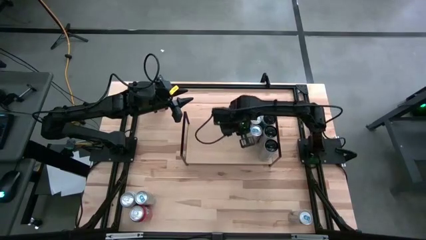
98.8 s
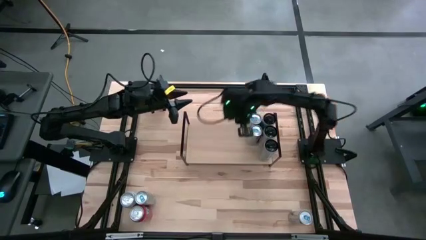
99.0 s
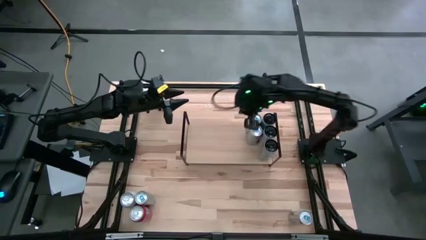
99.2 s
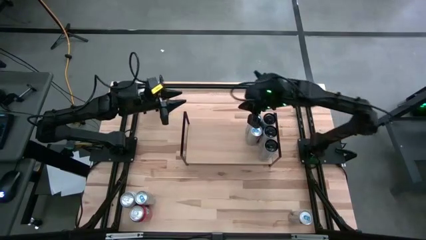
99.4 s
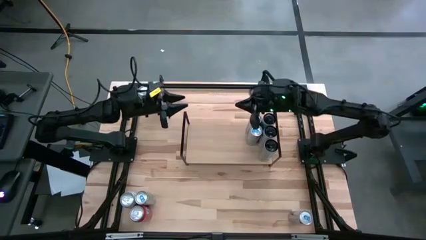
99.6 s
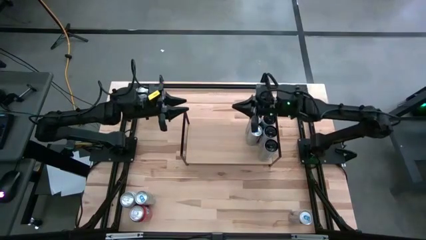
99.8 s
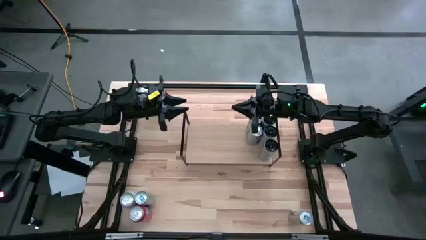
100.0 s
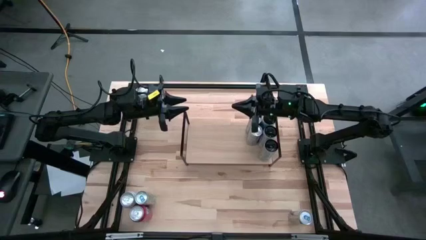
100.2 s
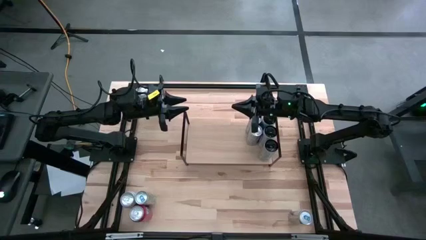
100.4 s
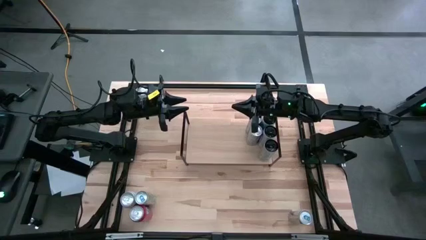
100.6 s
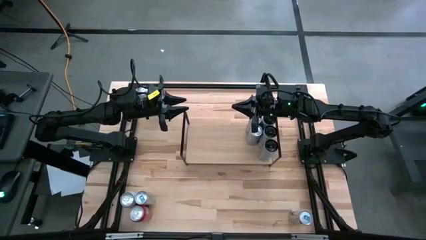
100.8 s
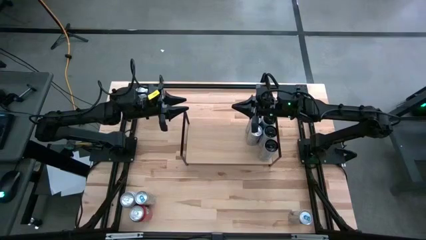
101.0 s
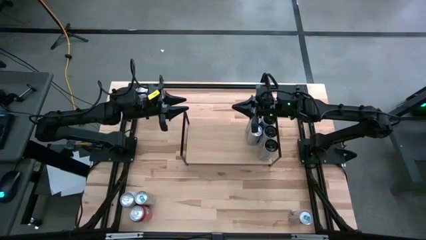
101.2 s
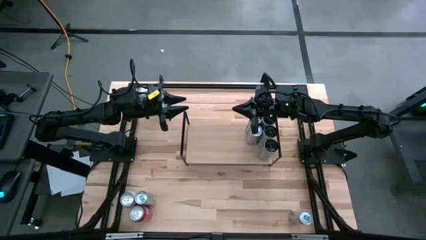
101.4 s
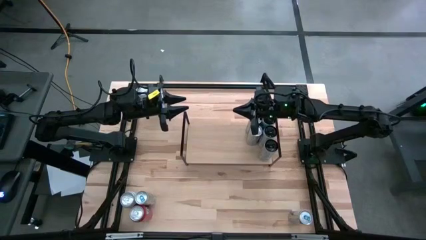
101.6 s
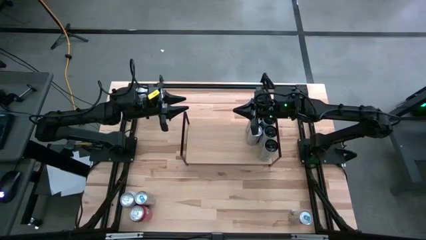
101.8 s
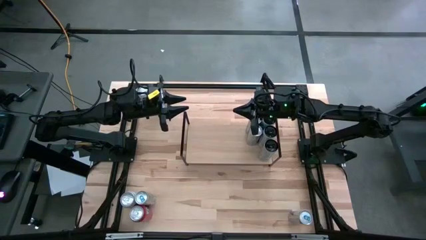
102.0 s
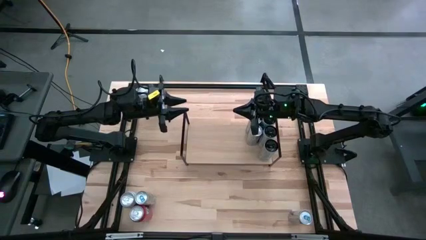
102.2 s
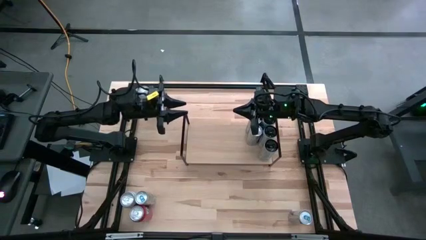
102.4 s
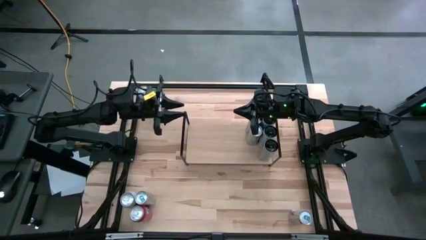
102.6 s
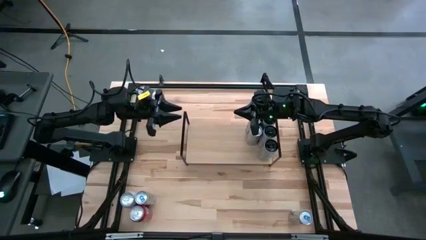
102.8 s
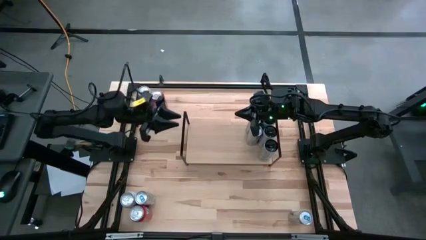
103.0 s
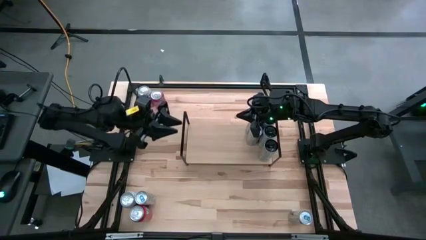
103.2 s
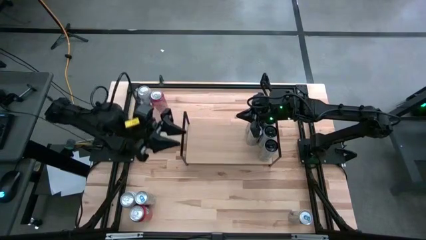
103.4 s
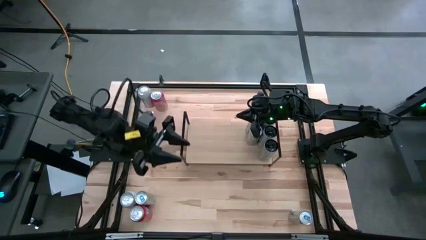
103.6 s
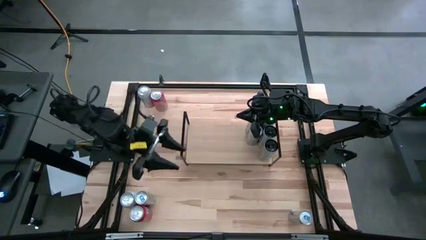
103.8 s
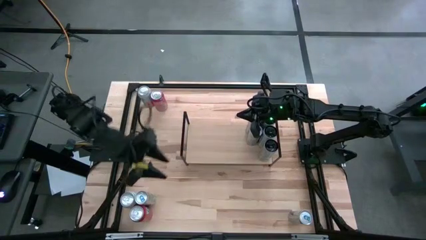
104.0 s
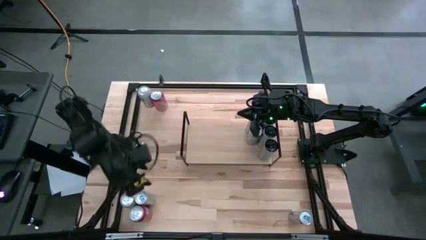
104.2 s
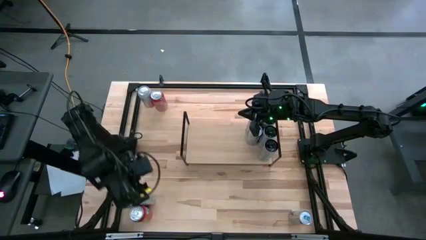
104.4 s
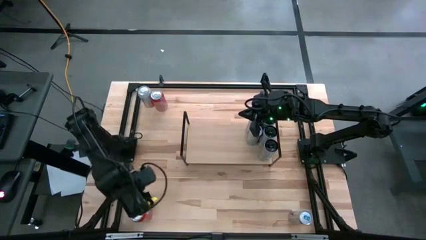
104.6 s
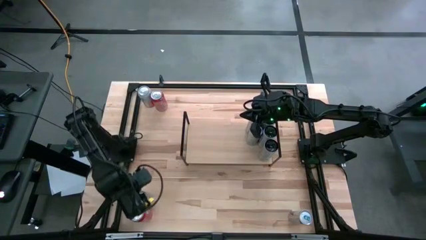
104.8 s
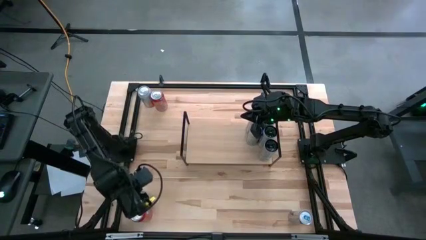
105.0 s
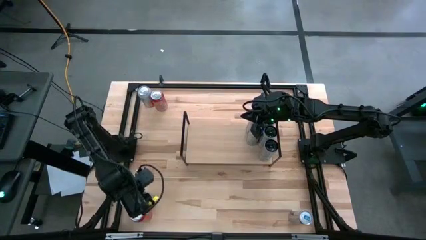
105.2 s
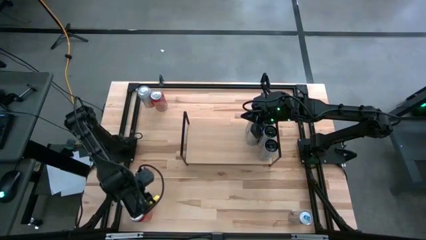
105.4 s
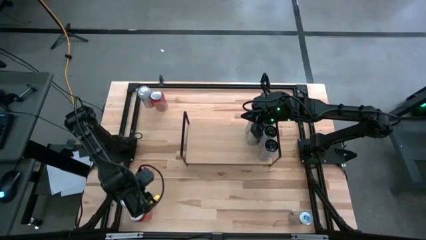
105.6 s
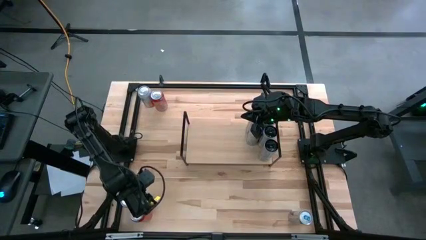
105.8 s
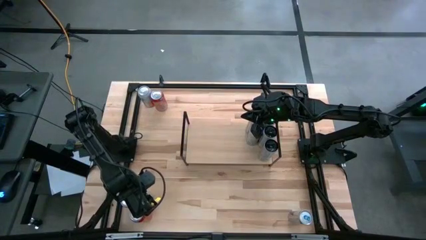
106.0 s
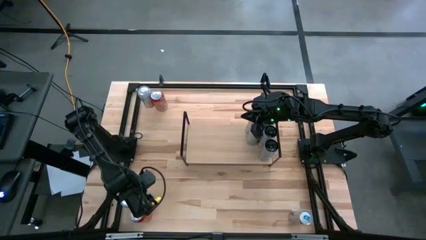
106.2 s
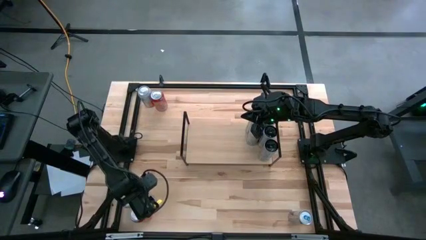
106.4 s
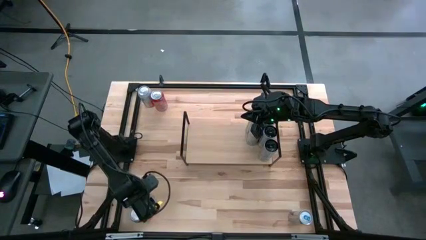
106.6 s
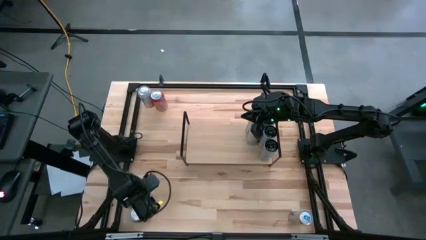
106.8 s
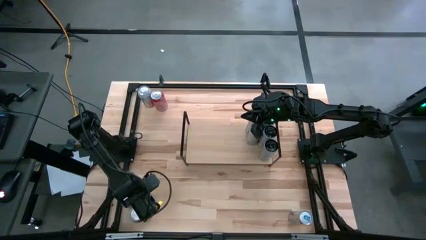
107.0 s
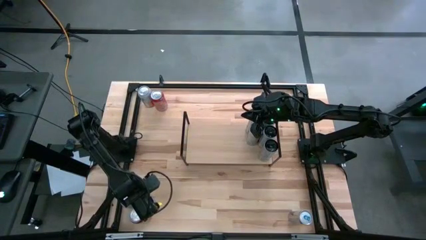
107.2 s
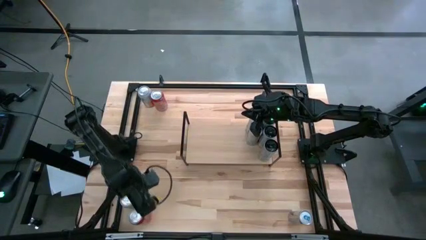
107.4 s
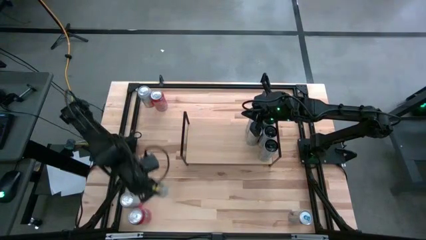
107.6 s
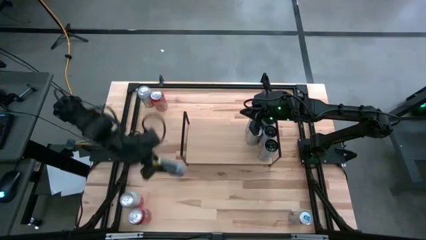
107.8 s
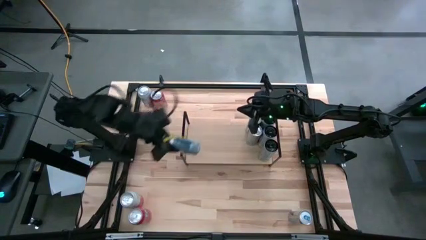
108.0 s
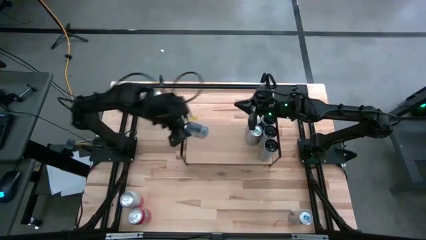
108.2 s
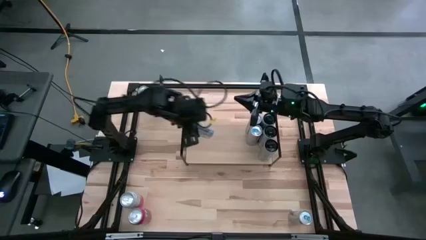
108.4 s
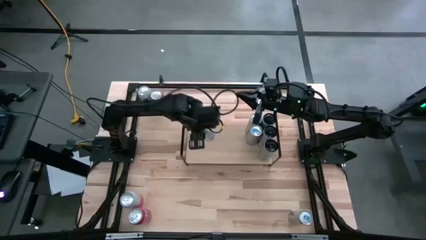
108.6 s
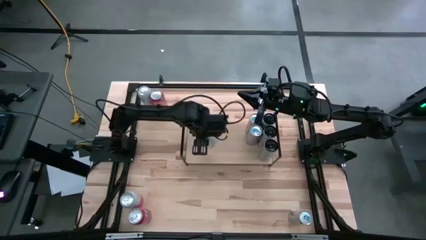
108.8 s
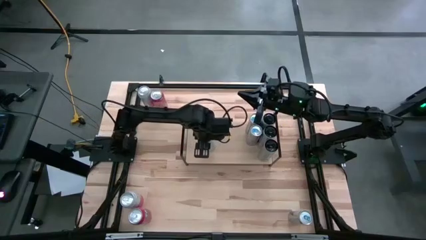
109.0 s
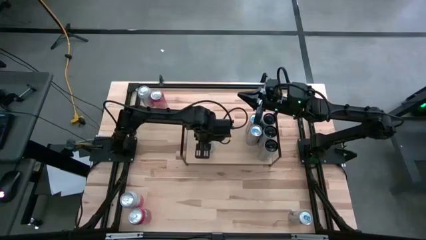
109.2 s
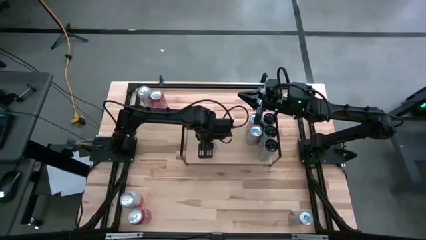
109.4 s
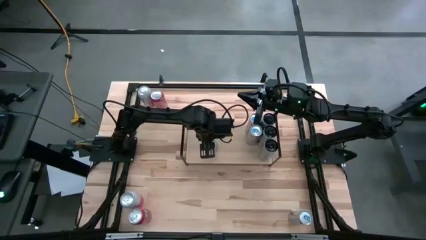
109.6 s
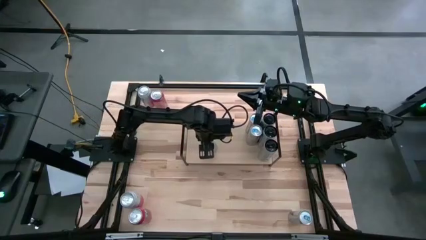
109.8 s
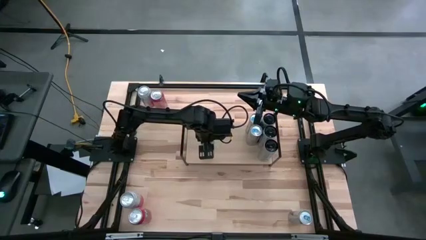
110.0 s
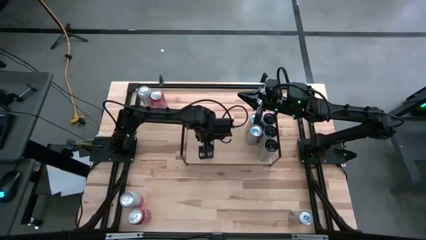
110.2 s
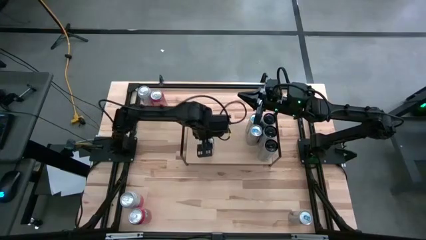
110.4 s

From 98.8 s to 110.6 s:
Task: Place canned beverage on shelf
Put the blue soda can on the shelf aligned with the other blue soda cans

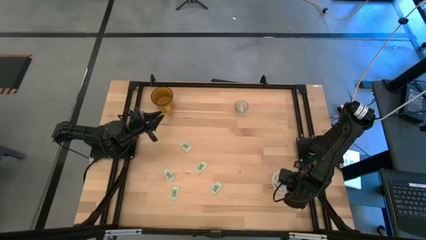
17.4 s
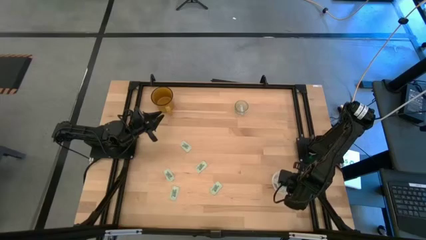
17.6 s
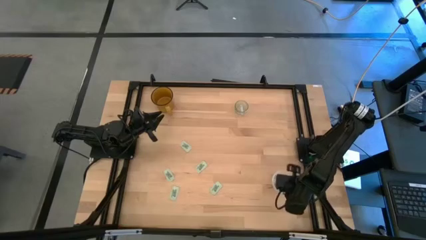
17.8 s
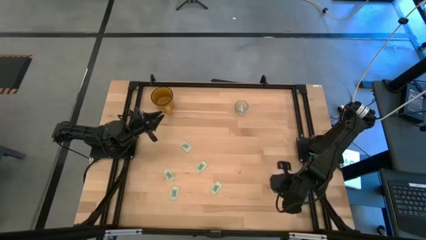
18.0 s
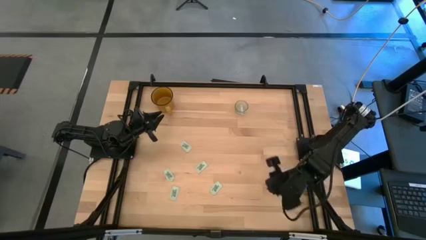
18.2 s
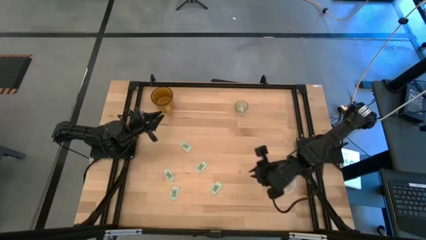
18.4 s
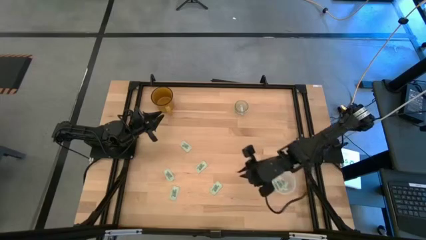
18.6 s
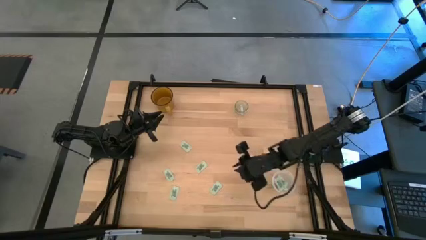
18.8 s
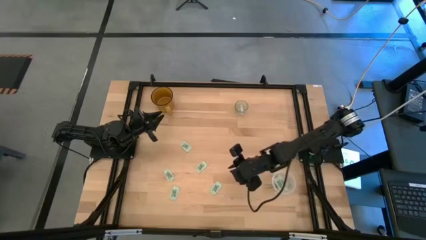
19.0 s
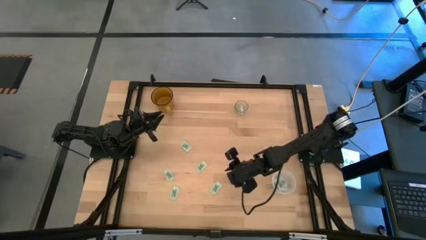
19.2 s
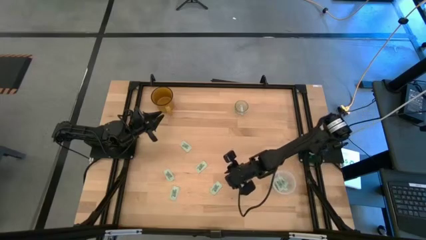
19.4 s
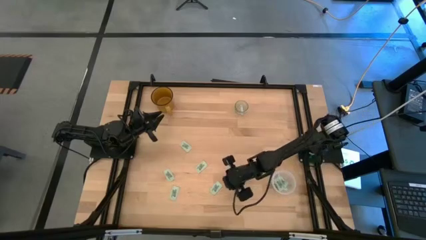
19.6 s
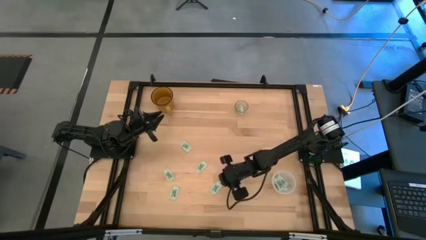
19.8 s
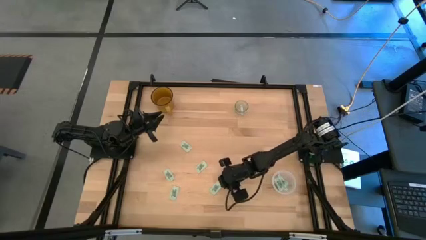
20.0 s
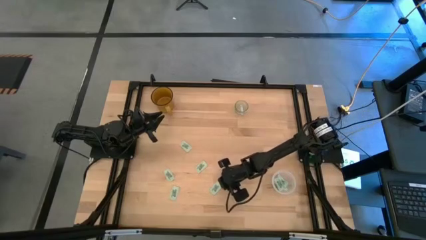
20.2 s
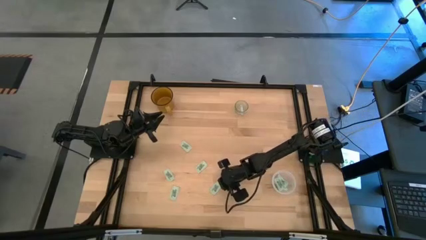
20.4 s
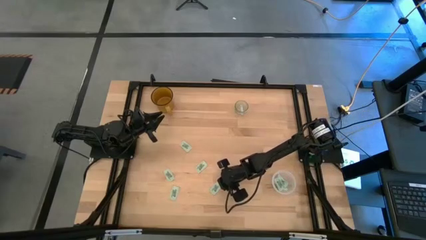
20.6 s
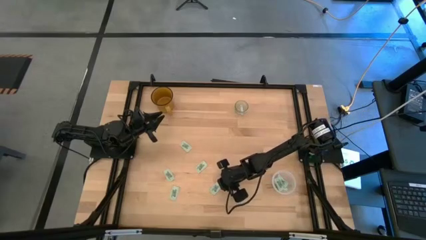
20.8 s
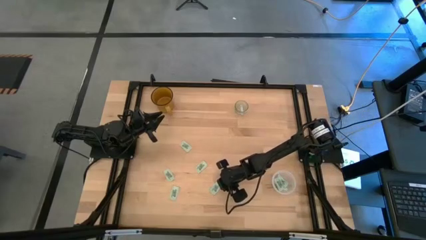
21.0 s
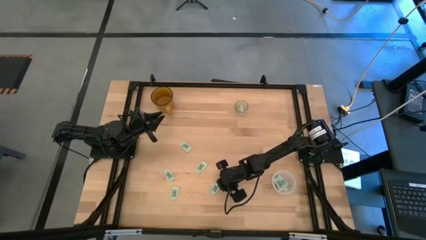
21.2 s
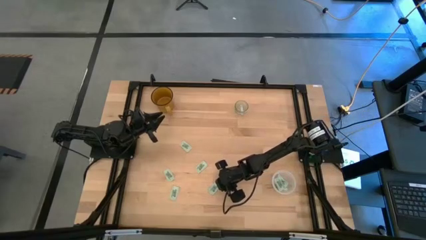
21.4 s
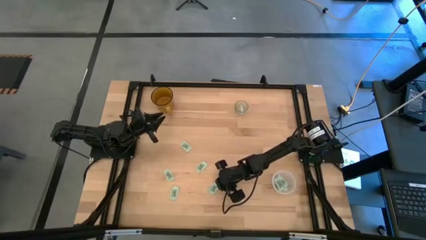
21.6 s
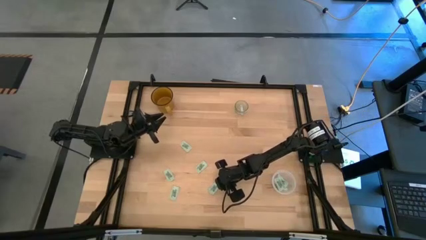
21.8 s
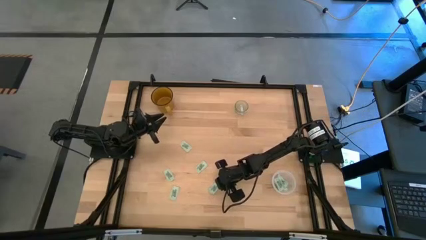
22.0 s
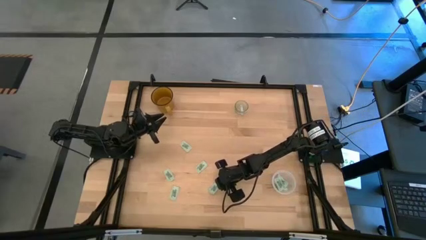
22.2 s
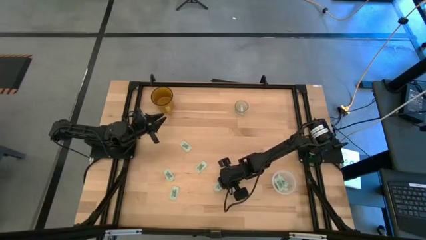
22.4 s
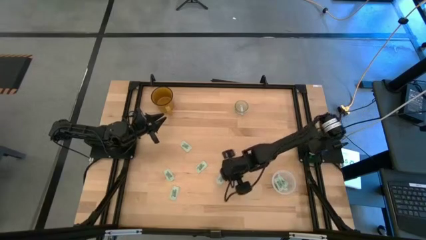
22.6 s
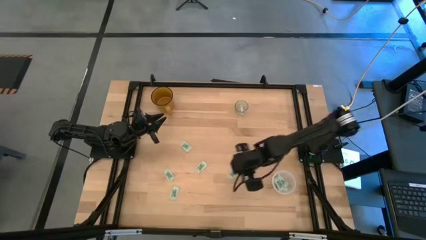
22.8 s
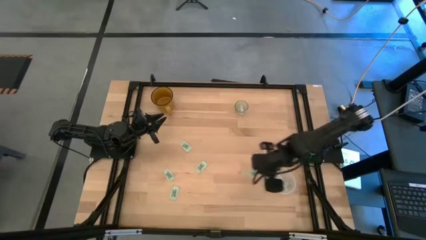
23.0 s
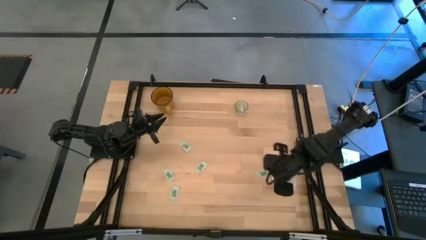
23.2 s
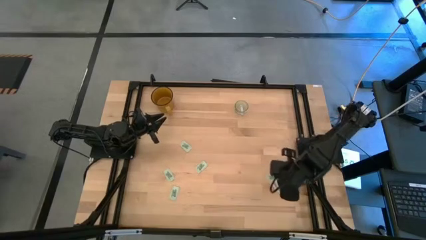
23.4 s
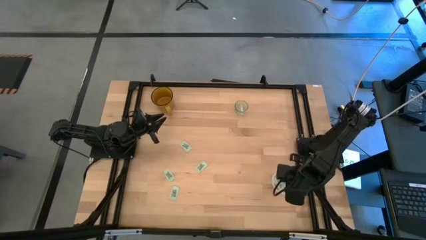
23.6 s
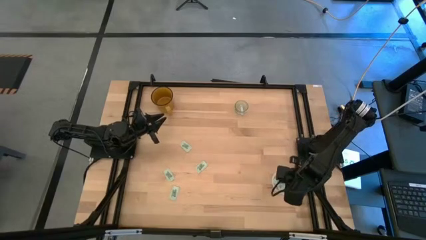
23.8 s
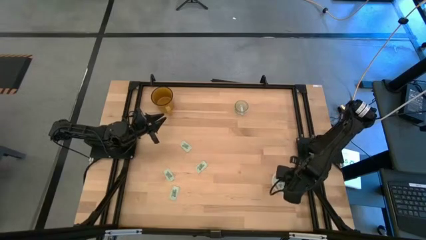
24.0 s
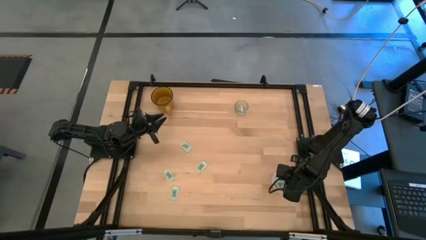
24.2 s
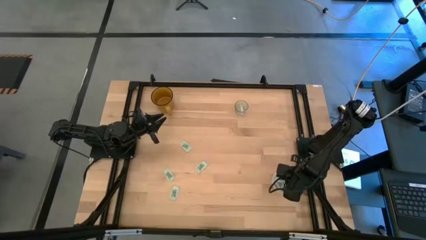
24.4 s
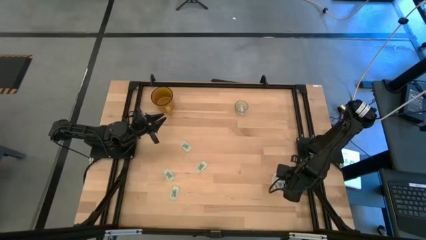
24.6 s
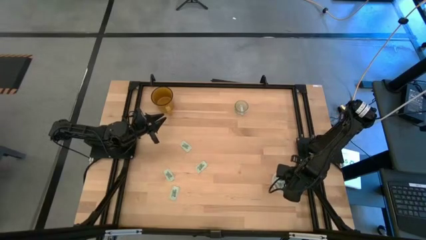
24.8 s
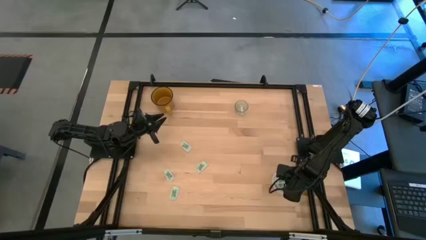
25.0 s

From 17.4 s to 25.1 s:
Task: Pick and place Stevia / Truvia into bins
Put the stevia packet into the transparent container
